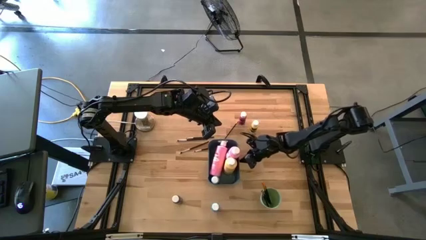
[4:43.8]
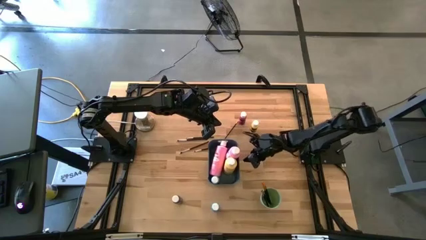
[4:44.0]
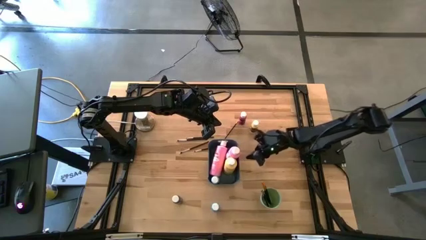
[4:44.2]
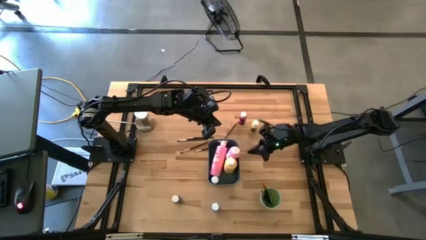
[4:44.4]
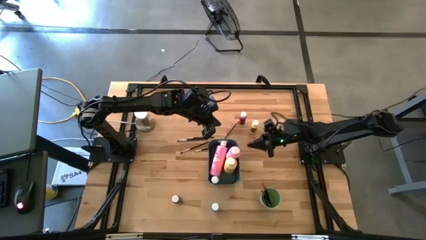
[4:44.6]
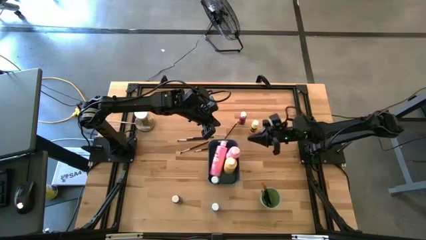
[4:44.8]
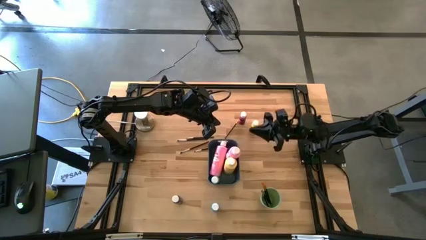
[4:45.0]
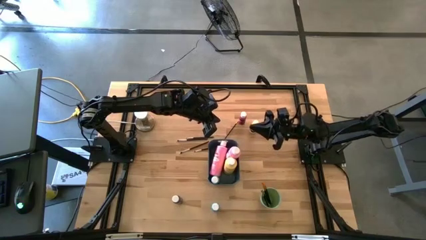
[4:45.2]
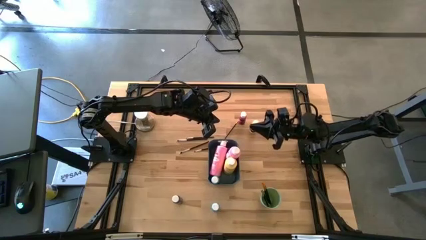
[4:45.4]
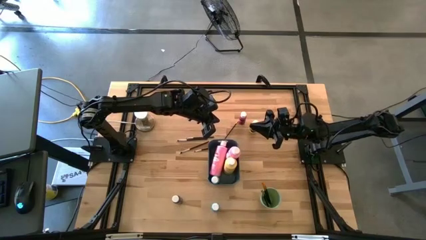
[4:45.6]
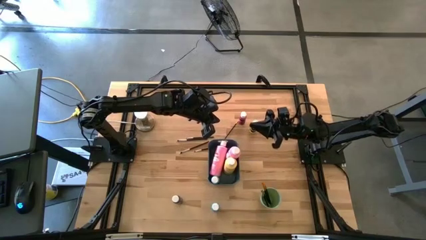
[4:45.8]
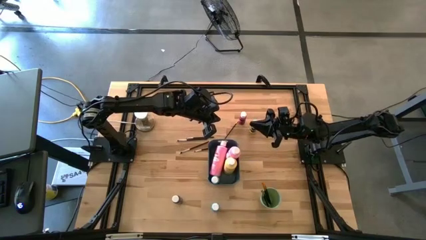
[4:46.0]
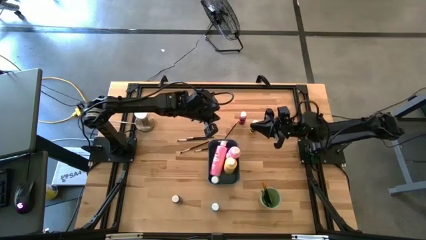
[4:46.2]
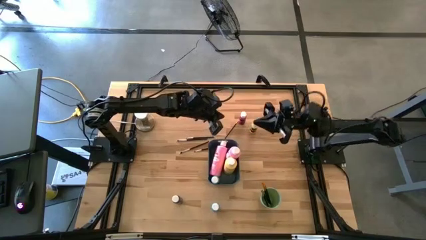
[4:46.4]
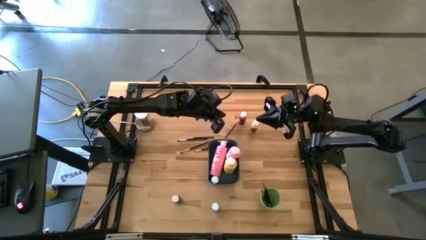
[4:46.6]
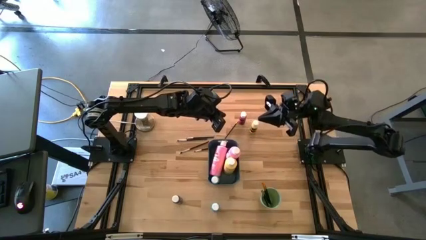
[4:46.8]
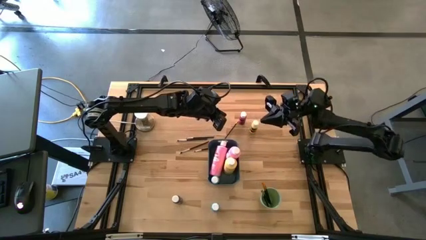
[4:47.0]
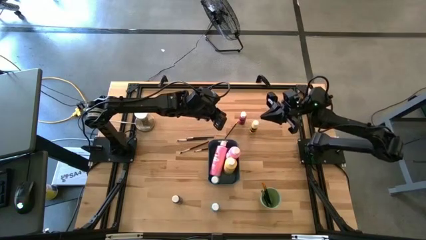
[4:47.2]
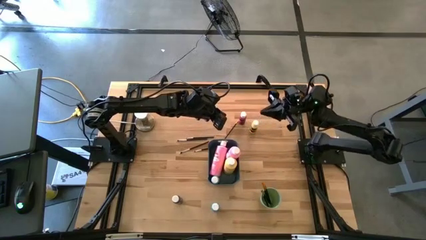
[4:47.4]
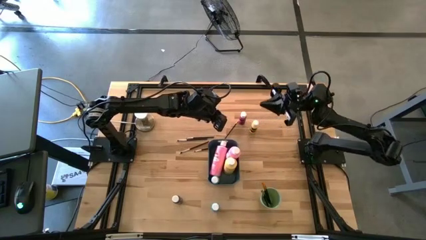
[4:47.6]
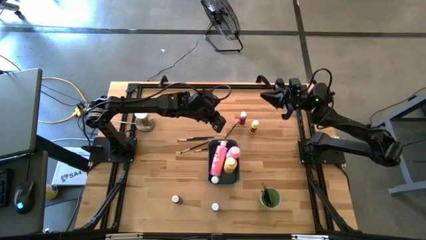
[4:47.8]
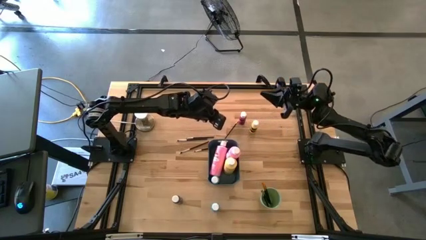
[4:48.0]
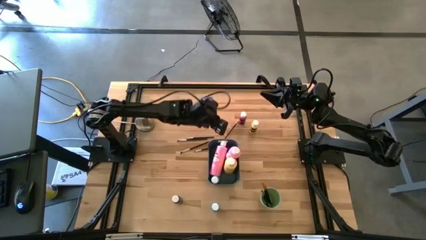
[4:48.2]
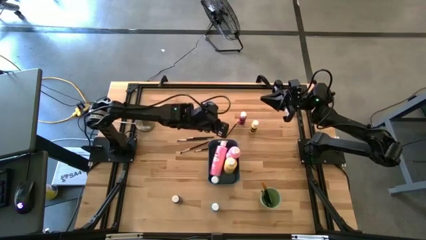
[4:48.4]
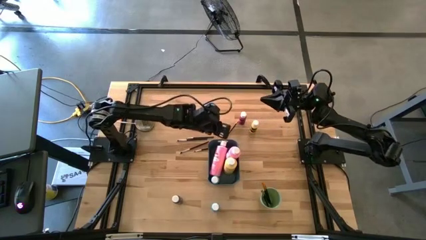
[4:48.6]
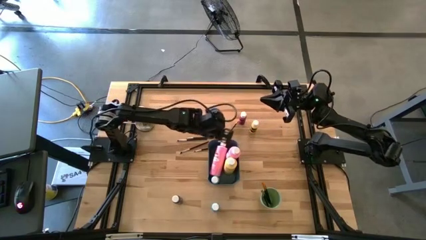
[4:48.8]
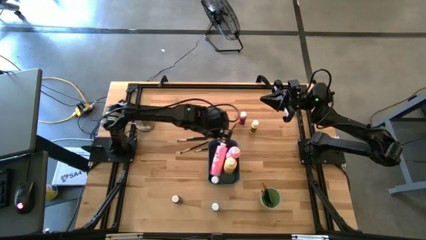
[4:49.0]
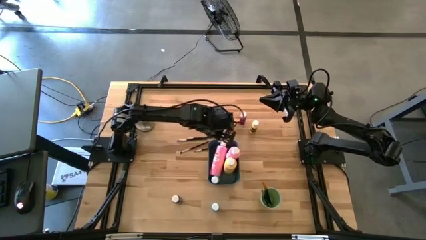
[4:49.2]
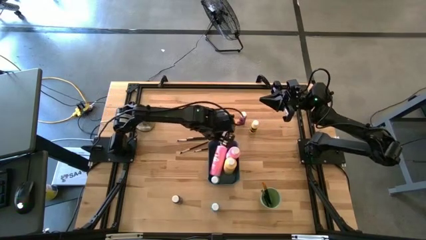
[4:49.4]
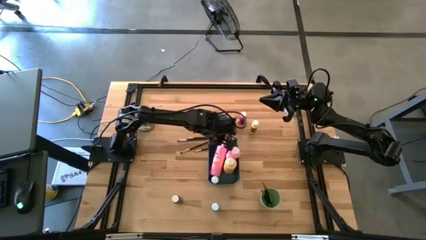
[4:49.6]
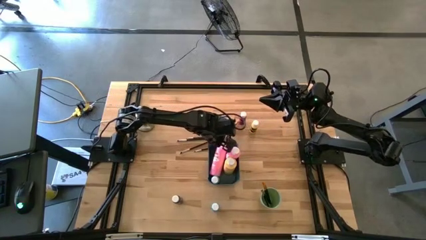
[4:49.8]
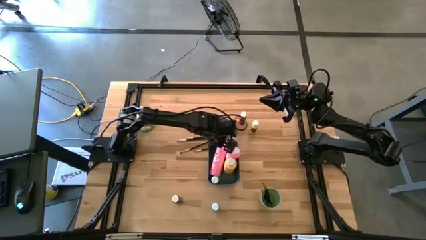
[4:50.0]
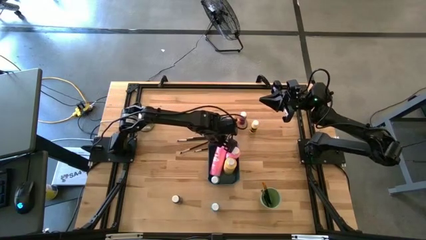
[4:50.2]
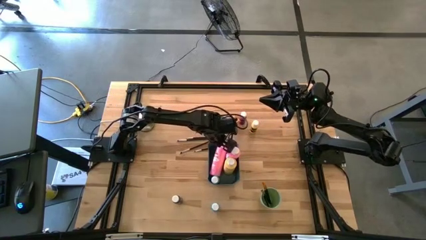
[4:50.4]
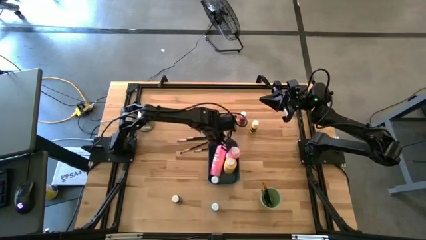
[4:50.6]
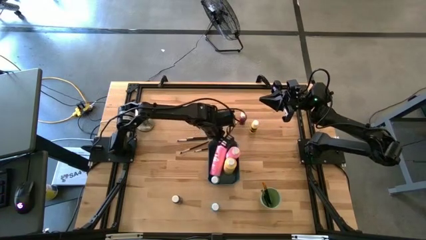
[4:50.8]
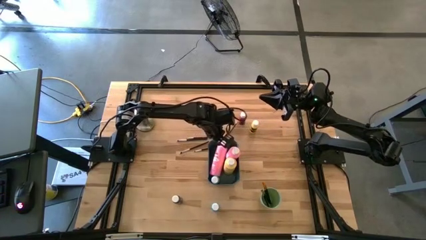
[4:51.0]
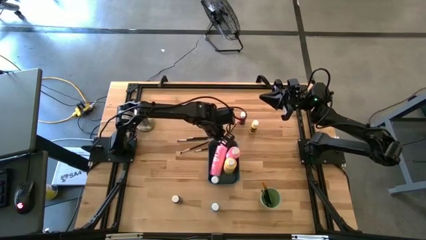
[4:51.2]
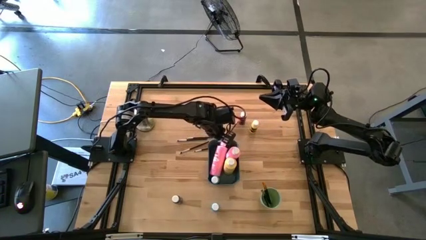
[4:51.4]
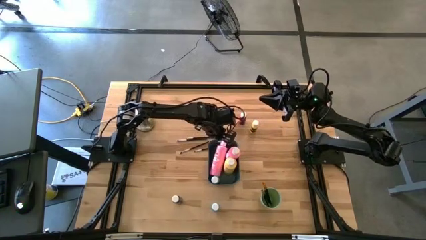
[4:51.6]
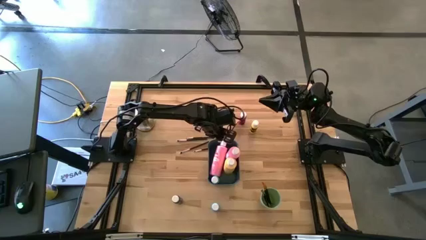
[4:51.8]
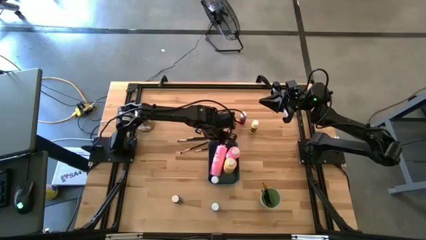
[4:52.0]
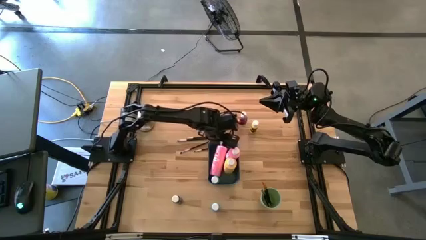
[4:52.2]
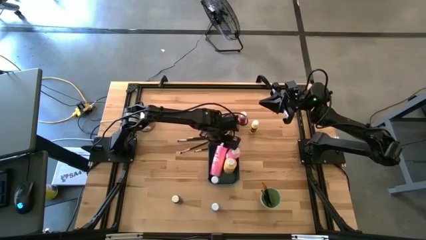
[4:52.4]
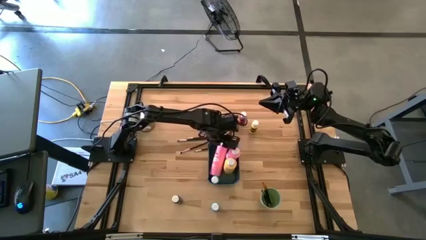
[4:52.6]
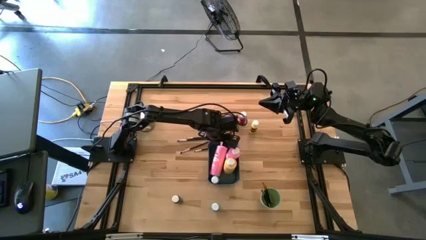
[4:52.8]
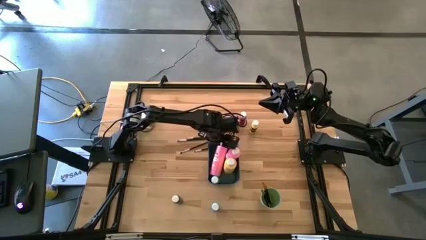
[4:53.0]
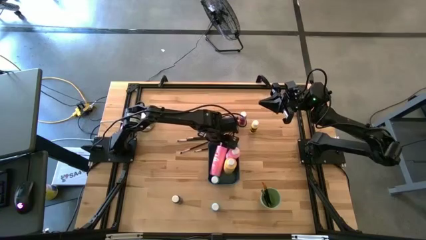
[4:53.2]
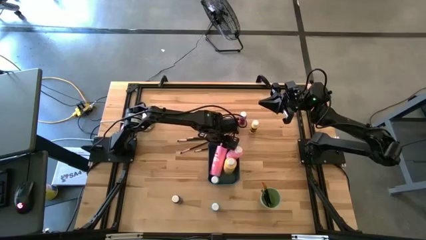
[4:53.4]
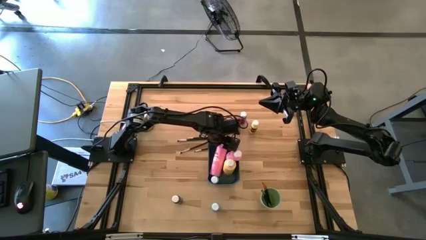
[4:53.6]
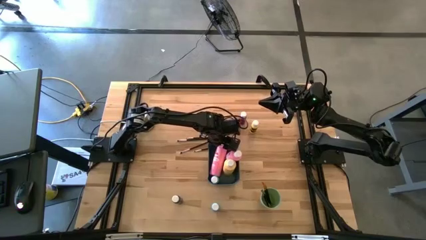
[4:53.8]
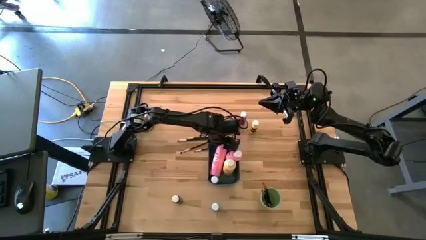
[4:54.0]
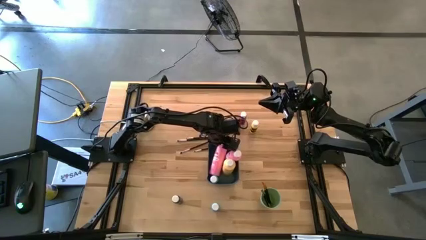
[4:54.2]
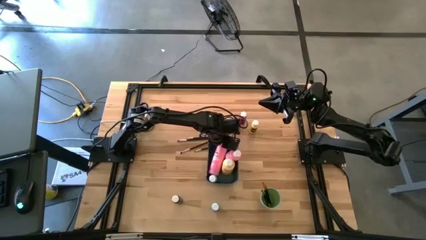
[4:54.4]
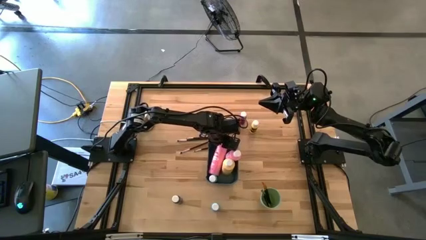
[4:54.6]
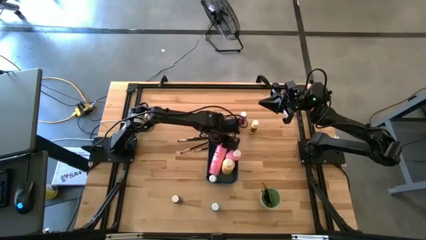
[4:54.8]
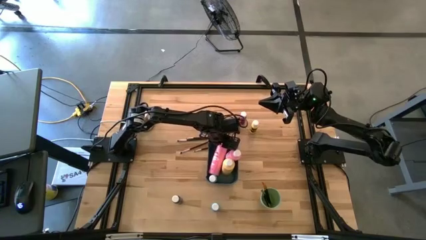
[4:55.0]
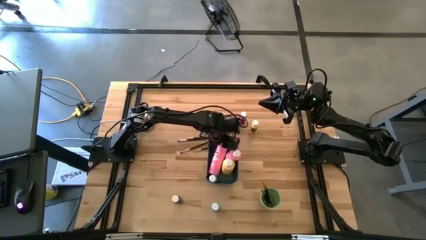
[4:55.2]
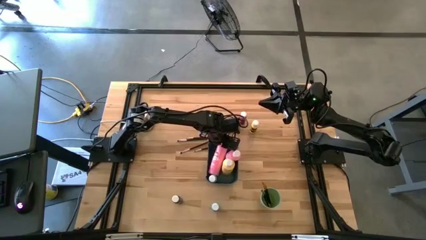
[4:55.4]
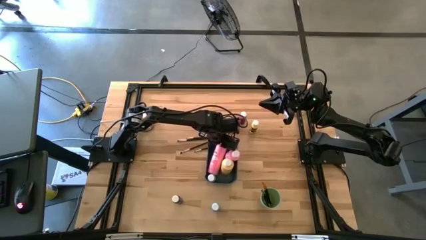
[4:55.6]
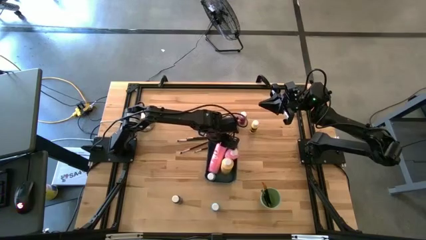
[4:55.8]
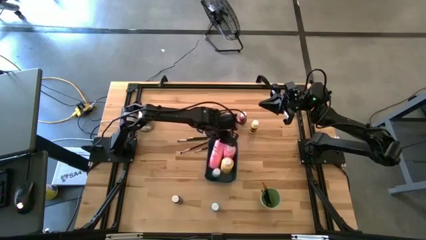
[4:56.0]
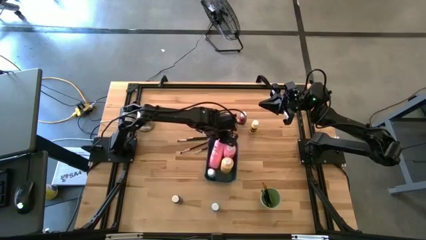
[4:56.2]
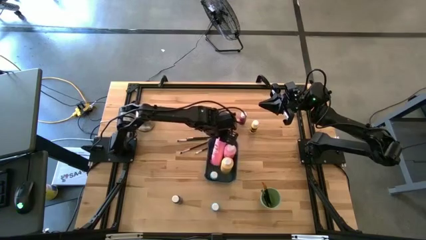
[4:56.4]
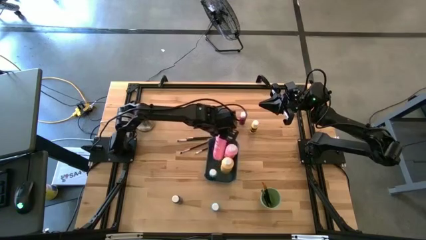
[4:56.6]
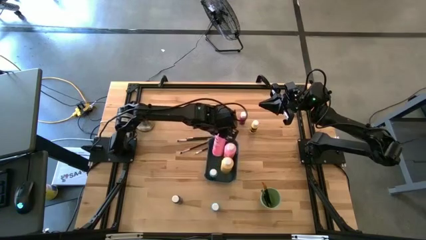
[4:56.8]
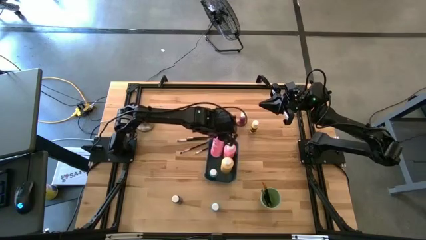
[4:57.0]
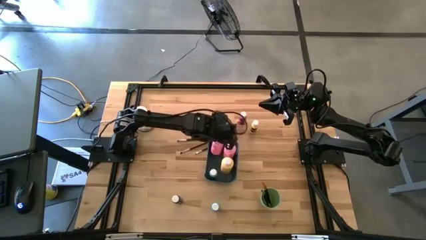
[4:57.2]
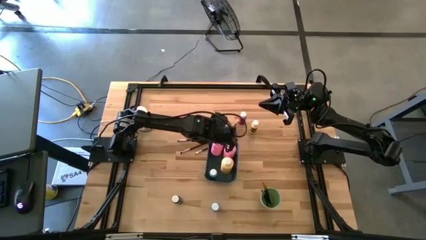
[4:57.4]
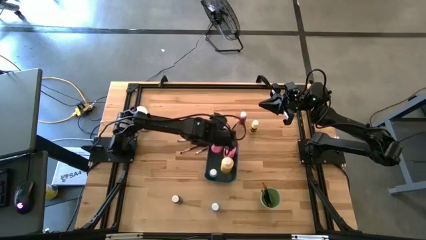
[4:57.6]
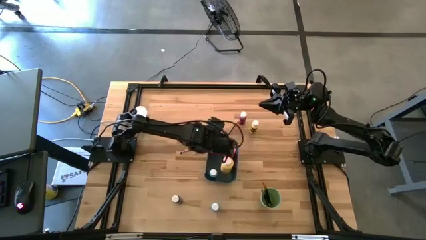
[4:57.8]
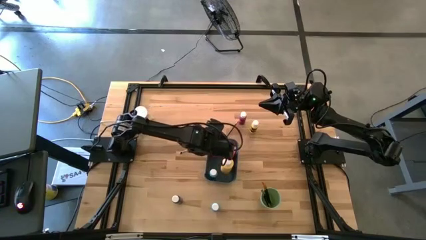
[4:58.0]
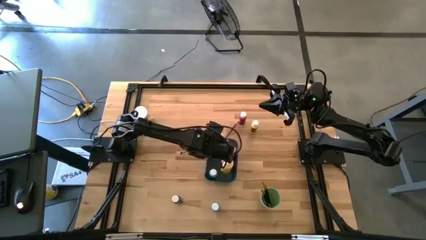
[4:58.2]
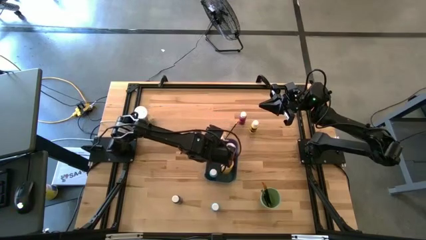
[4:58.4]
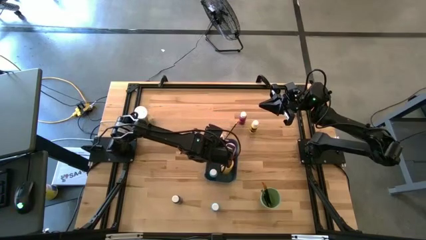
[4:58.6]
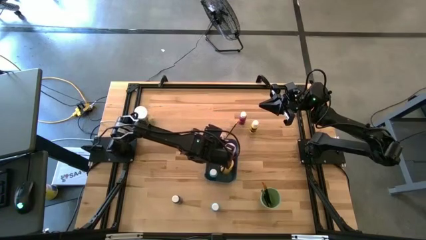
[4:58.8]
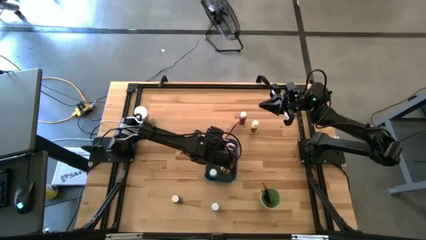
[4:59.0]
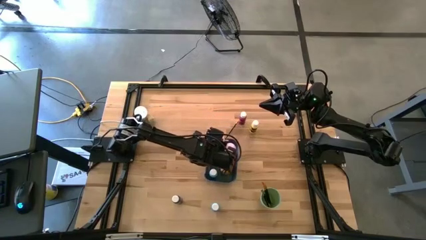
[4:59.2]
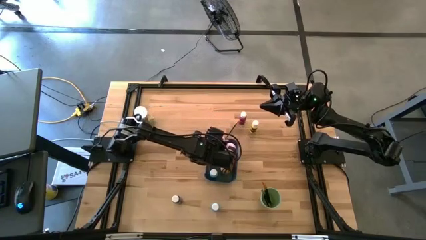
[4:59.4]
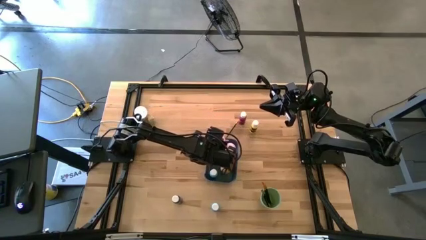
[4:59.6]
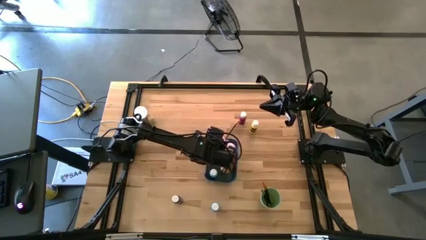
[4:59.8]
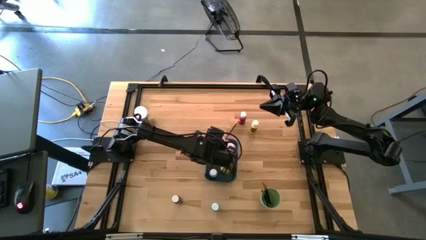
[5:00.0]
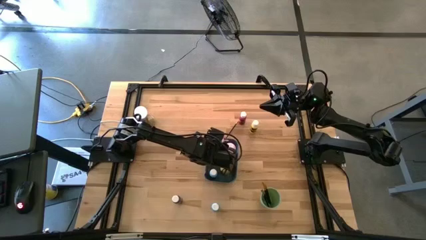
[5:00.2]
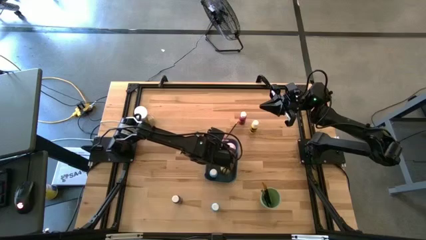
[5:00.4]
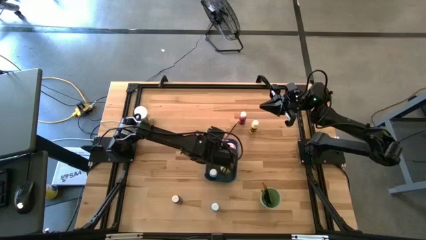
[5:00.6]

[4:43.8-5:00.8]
Task: Pick & Place Paint Supplies
Adjust the large pink paint bottle in the blue bin
